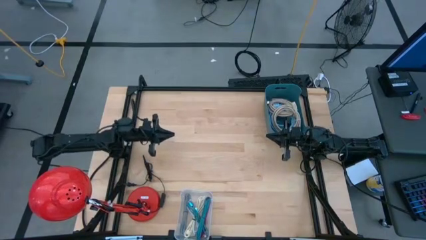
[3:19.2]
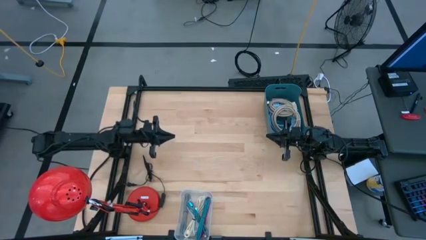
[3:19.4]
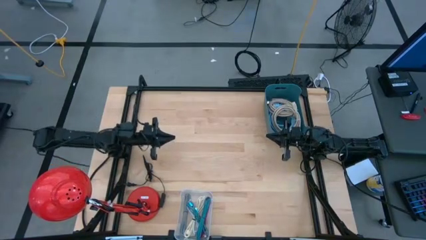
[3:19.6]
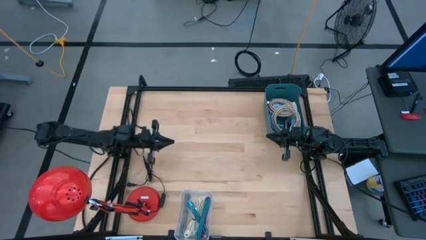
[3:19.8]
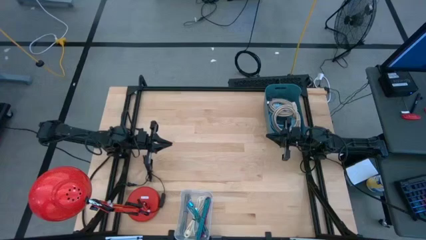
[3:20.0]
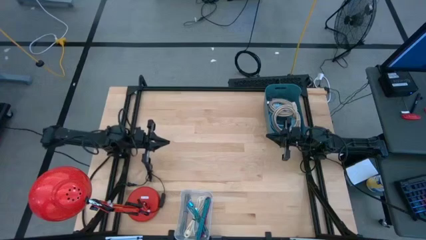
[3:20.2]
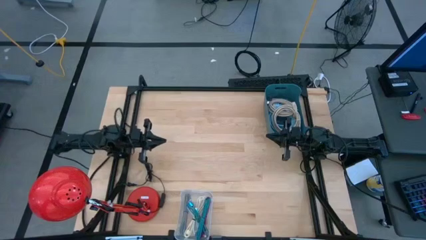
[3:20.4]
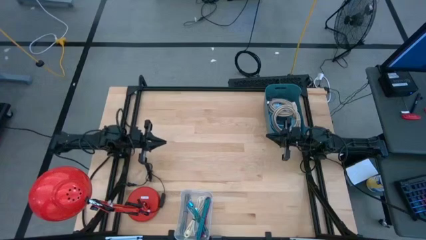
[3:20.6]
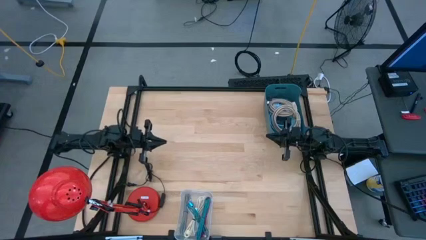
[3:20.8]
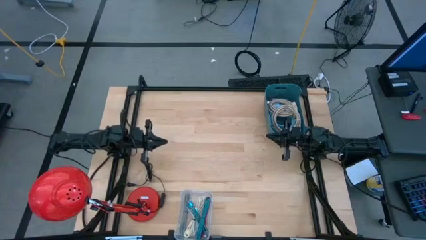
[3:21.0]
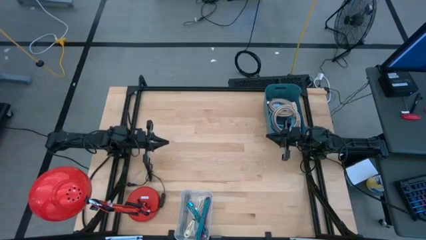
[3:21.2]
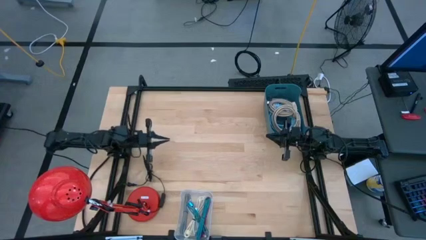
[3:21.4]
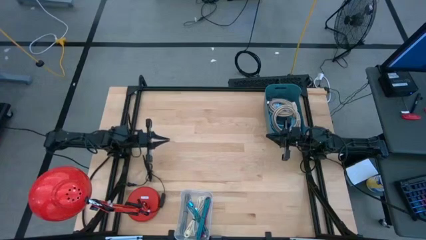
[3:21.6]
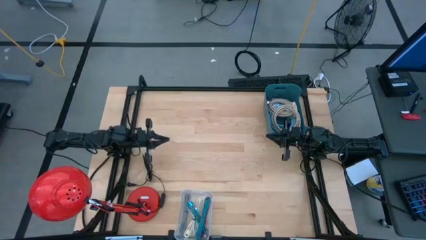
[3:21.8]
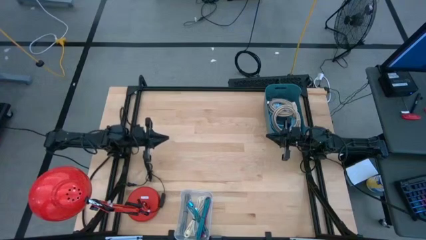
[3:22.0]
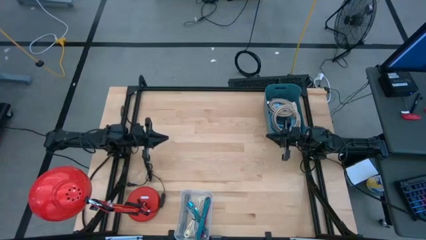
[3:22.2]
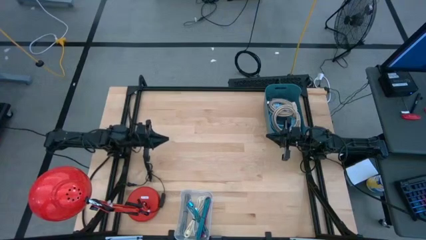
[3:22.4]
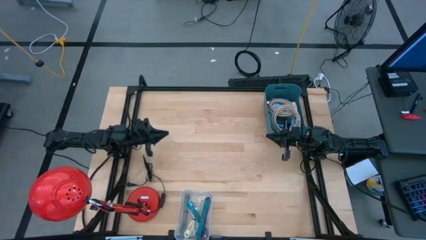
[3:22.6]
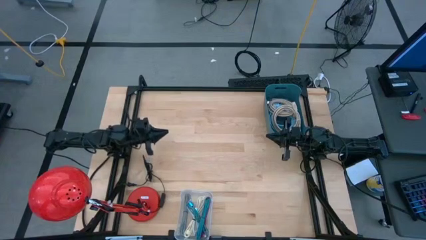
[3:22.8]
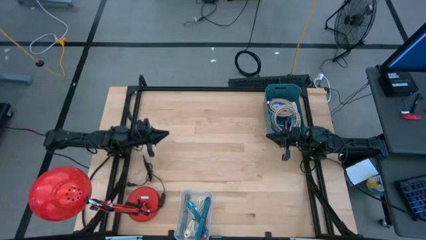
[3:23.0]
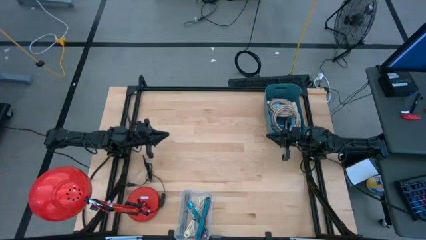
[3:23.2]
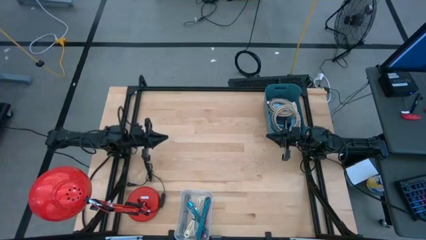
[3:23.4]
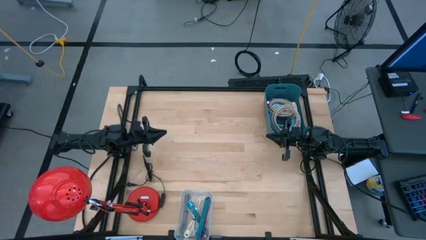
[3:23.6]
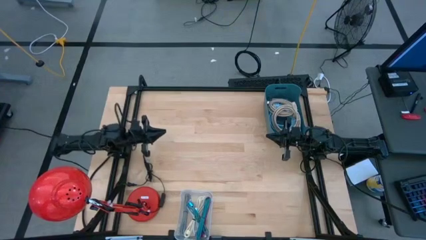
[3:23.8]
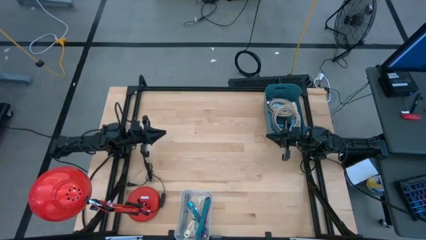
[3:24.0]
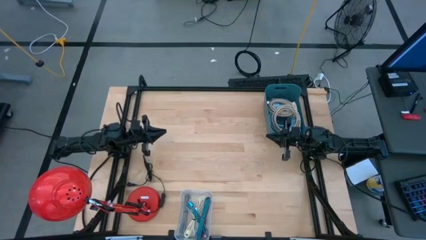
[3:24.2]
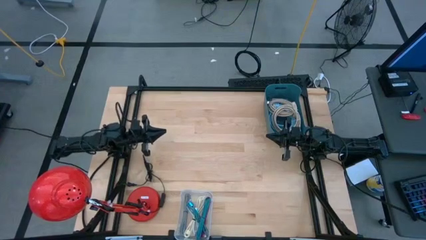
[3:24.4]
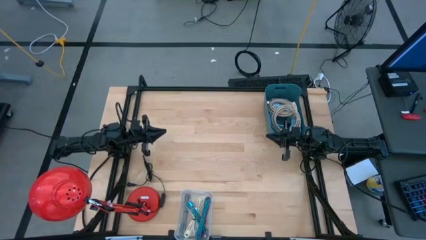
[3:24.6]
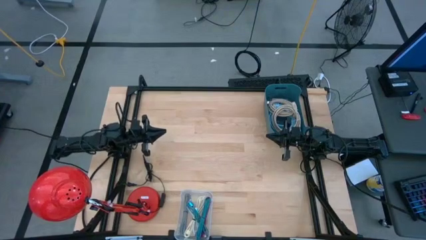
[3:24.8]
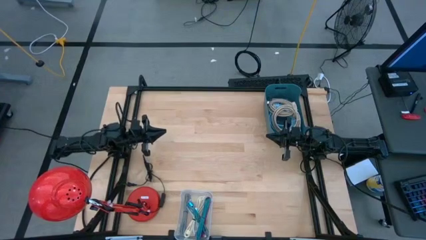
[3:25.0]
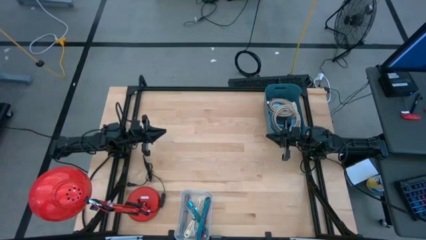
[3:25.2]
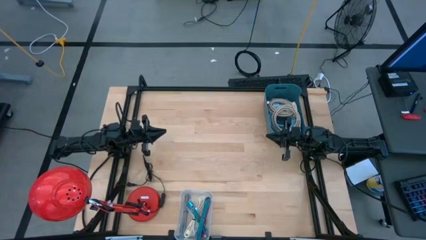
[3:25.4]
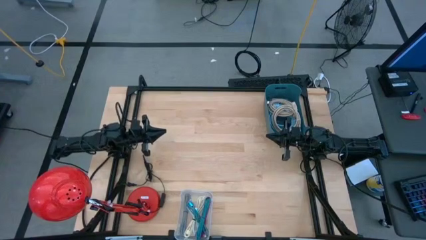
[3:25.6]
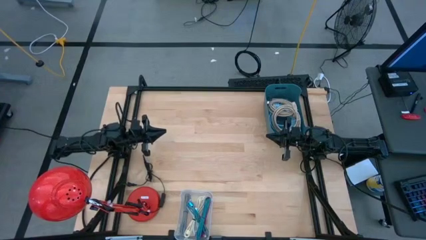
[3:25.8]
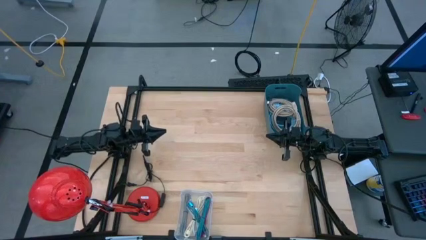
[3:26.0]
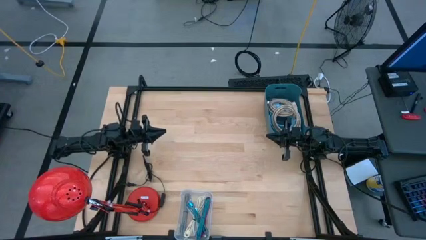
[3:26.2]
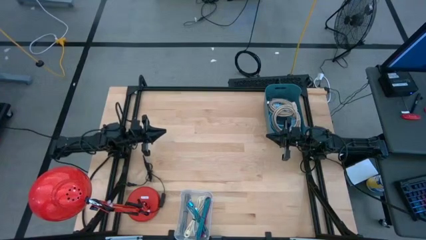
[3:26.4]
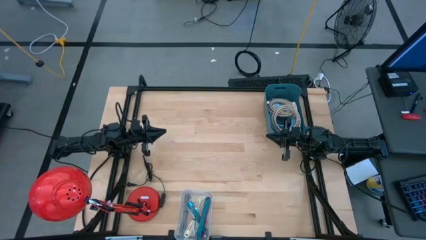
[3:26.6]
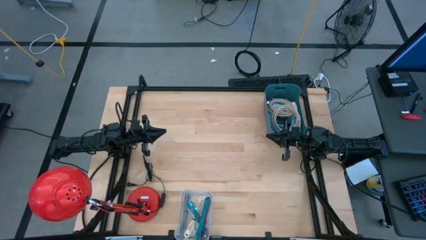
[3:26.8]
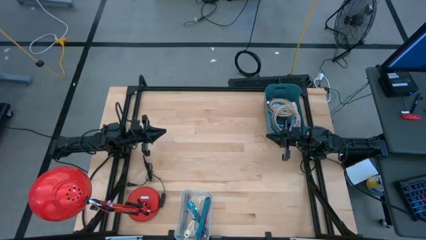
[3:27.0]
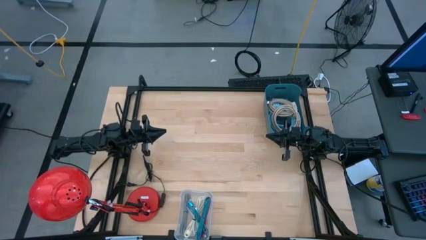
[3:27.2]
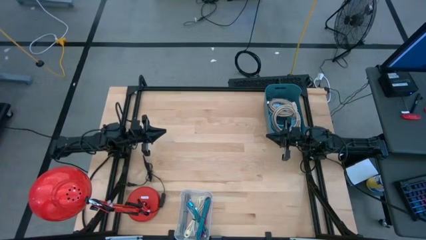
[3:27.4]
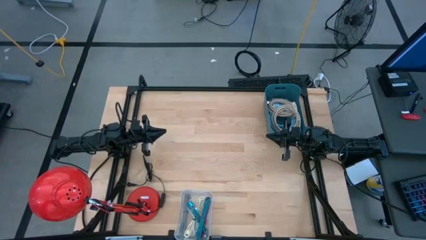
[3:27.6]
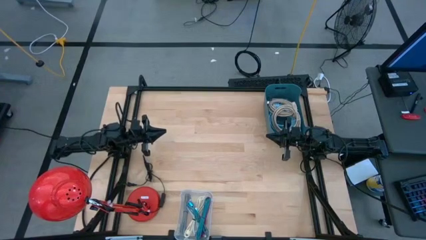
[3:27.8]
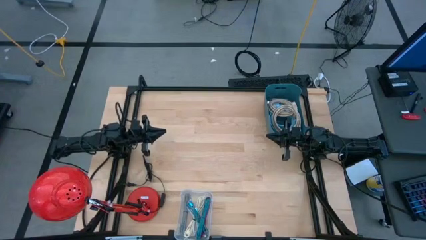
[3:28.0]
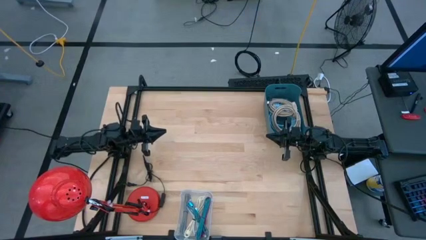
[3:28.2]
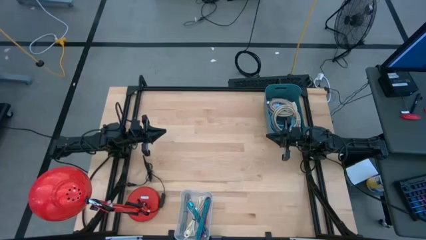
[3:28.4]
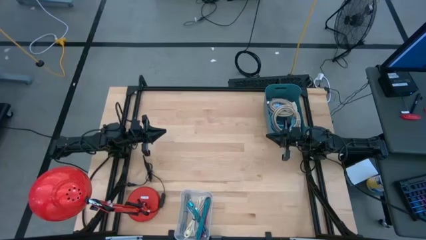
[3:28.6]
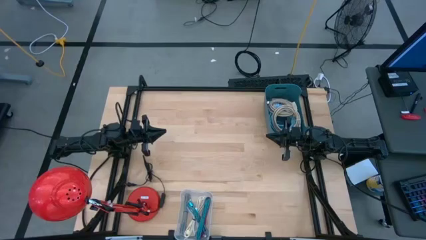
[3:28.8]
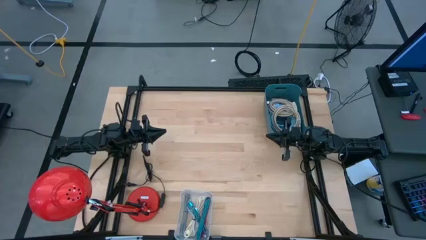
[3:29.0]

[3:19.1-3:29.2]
Task: Pick & Place USB Port
Return to Home Position
